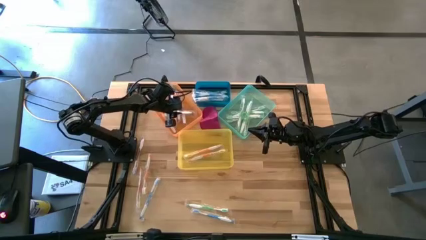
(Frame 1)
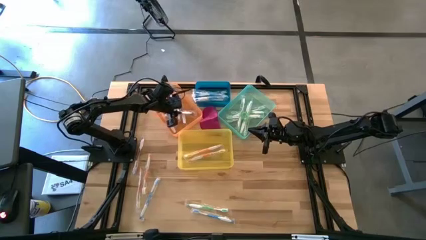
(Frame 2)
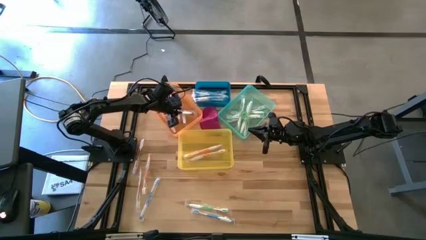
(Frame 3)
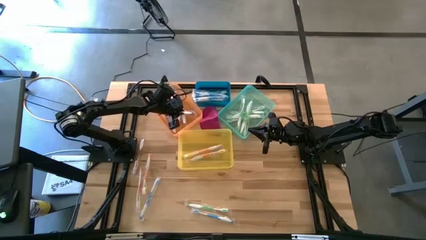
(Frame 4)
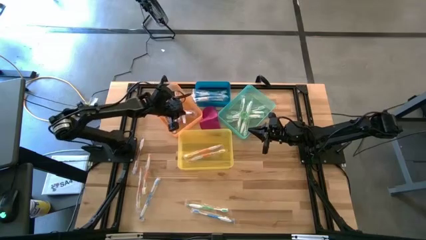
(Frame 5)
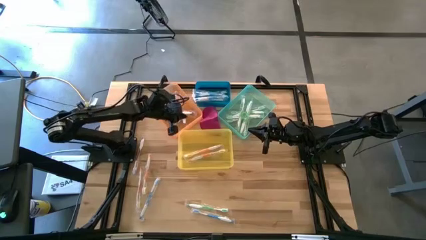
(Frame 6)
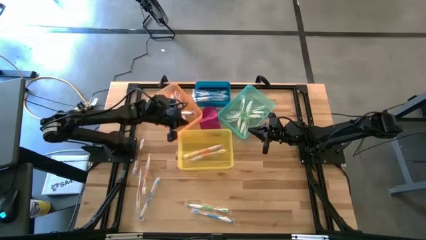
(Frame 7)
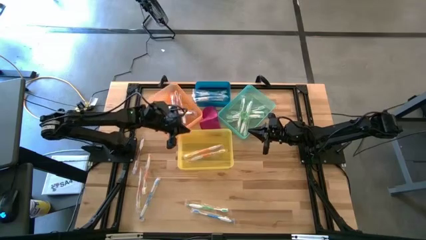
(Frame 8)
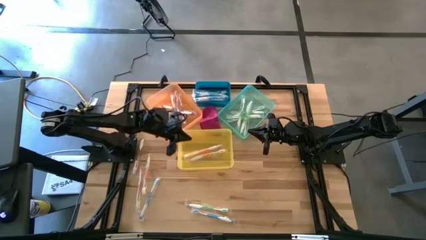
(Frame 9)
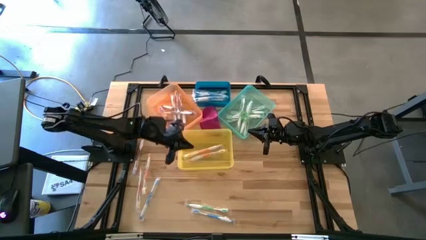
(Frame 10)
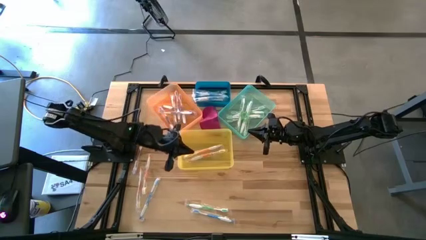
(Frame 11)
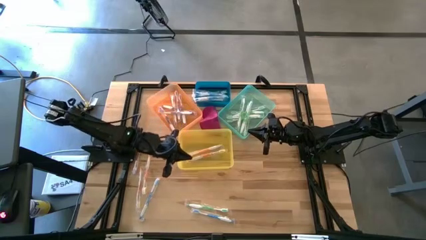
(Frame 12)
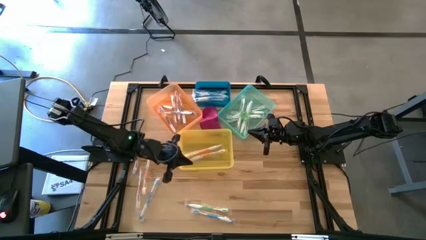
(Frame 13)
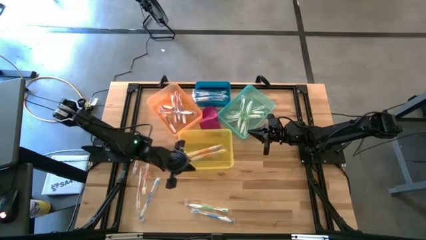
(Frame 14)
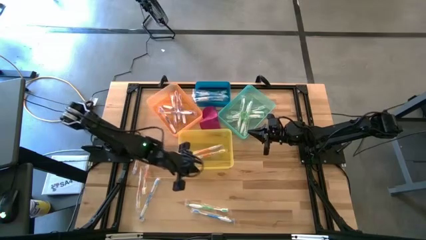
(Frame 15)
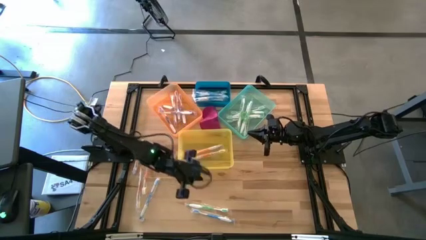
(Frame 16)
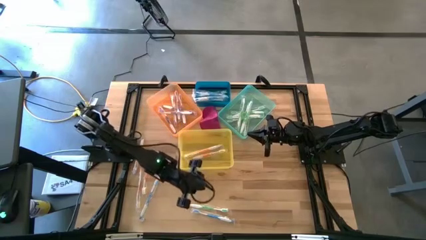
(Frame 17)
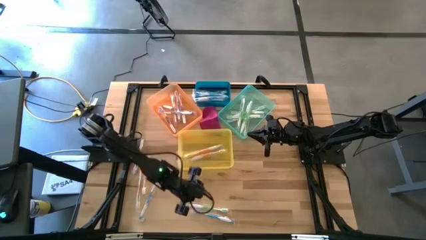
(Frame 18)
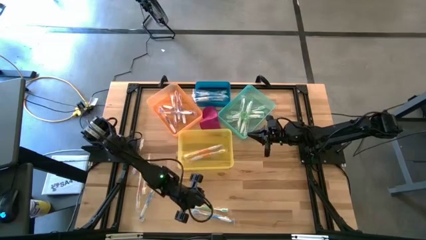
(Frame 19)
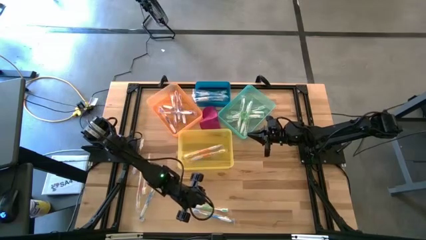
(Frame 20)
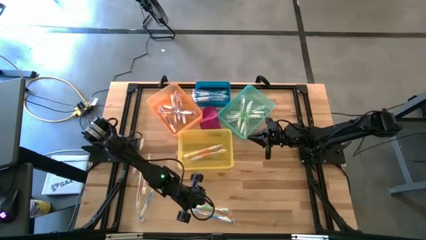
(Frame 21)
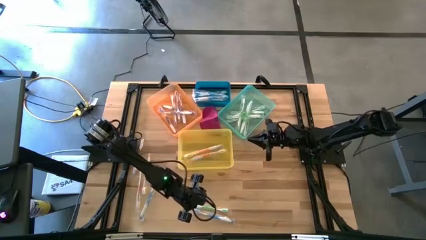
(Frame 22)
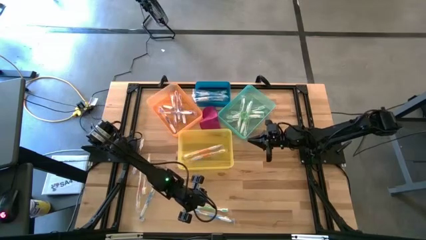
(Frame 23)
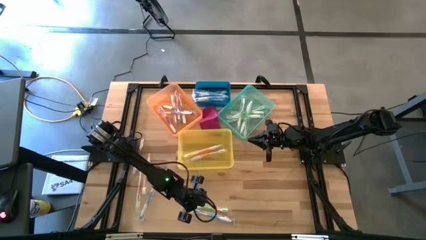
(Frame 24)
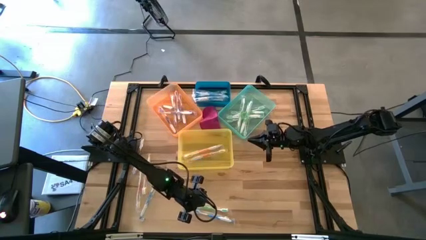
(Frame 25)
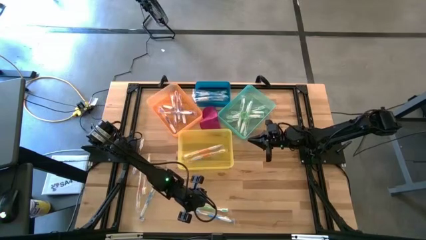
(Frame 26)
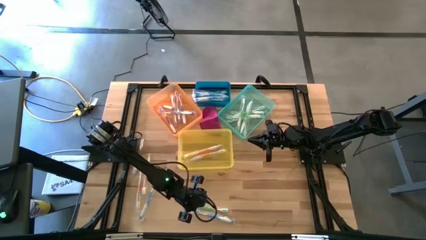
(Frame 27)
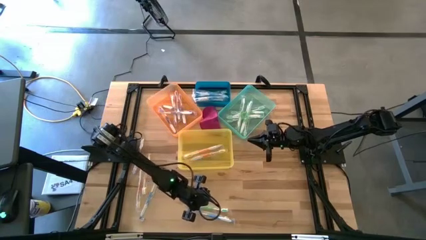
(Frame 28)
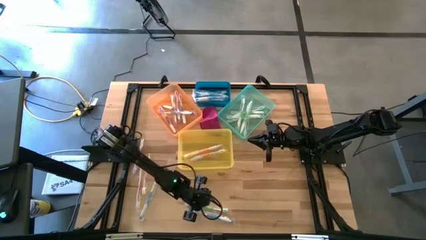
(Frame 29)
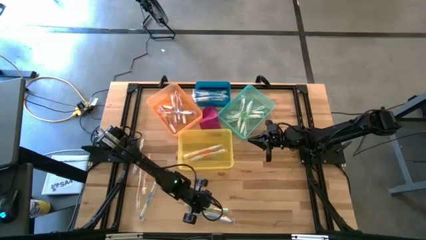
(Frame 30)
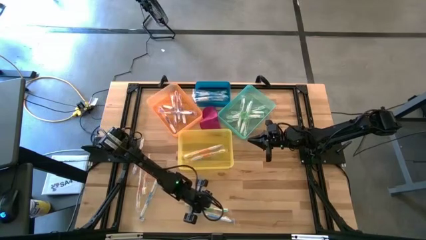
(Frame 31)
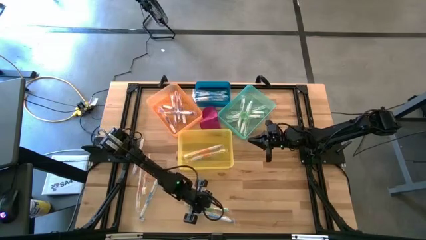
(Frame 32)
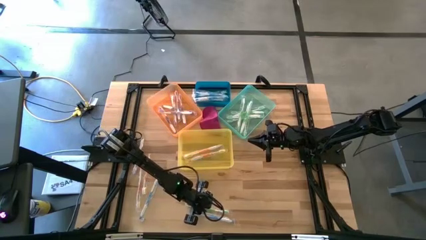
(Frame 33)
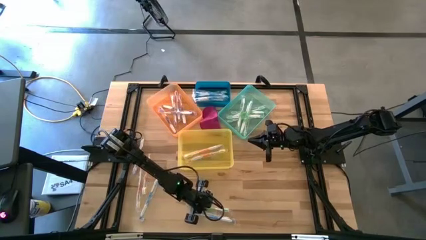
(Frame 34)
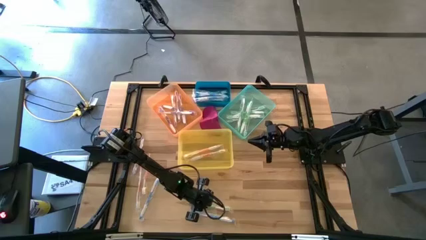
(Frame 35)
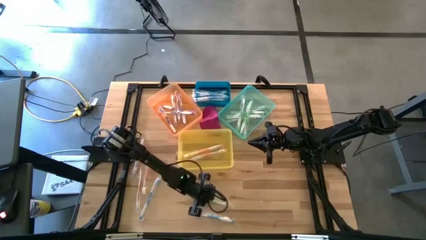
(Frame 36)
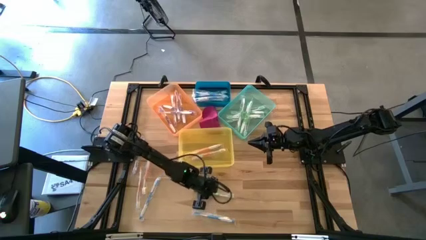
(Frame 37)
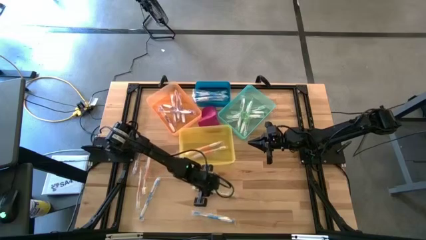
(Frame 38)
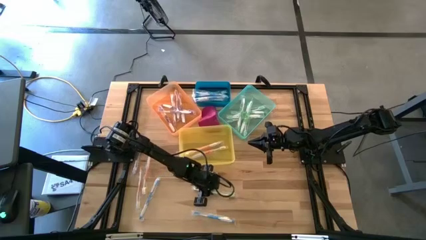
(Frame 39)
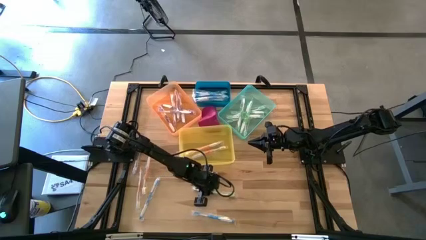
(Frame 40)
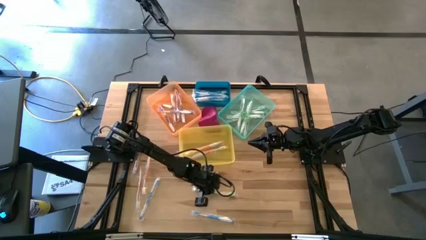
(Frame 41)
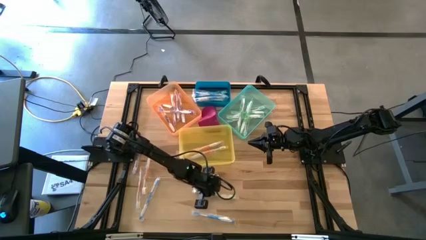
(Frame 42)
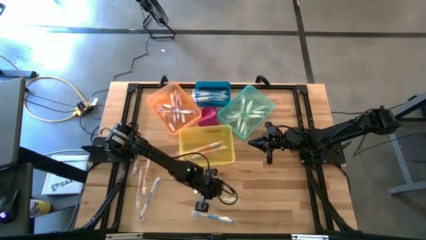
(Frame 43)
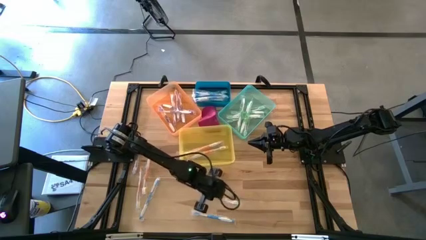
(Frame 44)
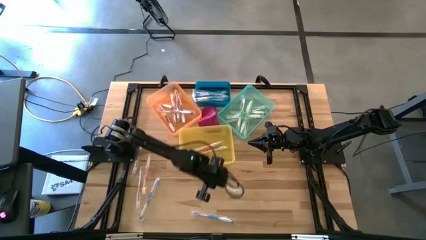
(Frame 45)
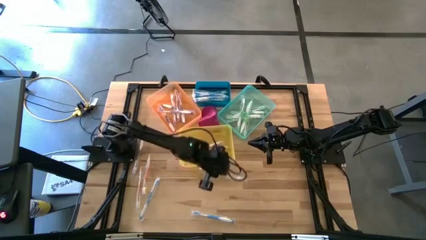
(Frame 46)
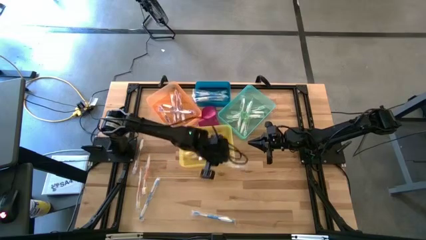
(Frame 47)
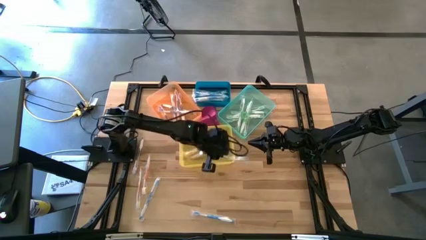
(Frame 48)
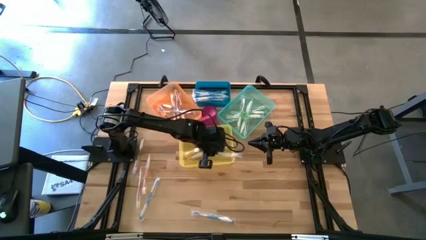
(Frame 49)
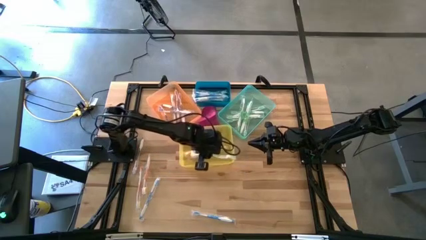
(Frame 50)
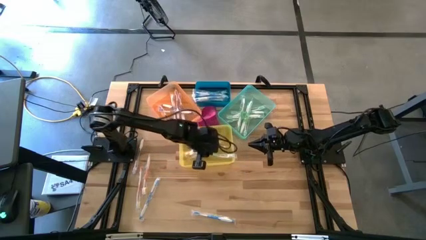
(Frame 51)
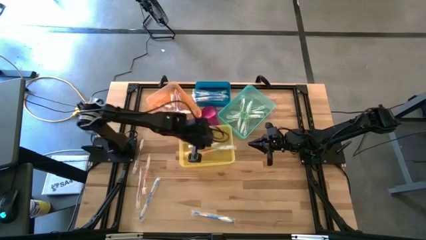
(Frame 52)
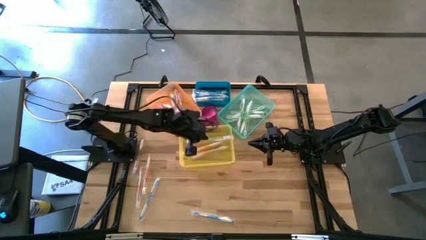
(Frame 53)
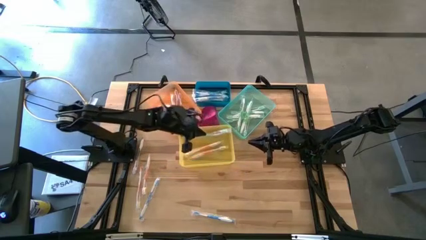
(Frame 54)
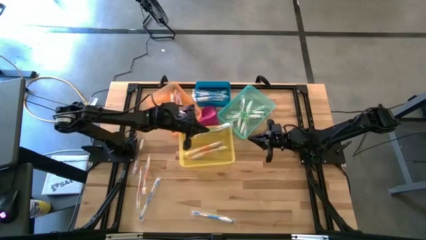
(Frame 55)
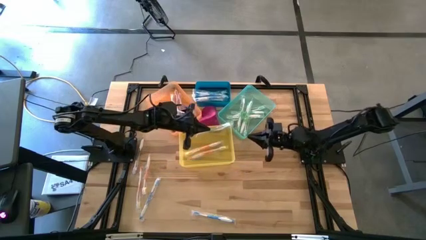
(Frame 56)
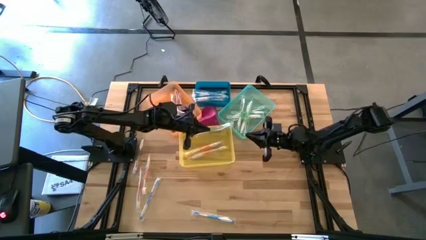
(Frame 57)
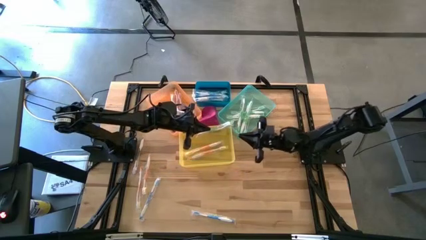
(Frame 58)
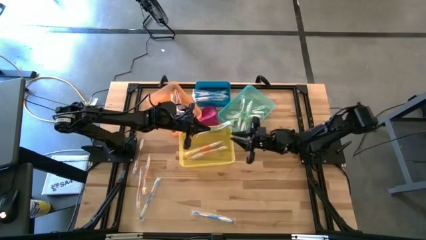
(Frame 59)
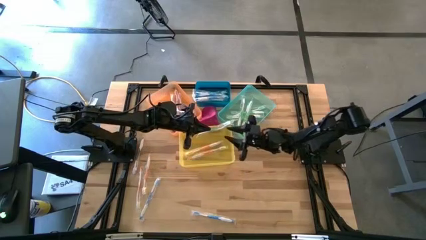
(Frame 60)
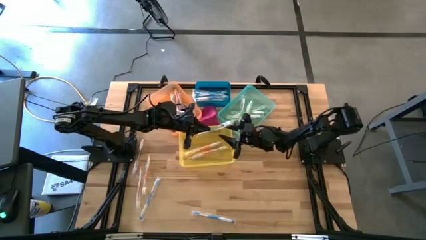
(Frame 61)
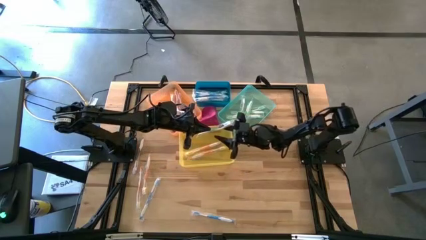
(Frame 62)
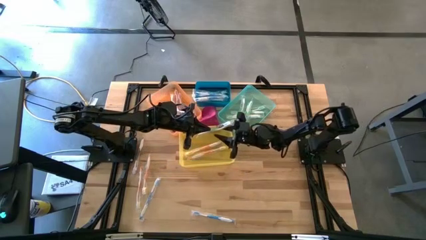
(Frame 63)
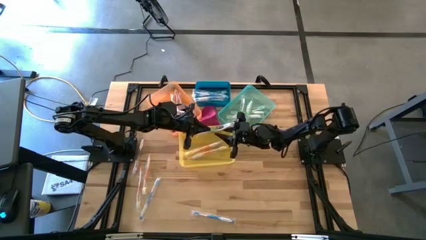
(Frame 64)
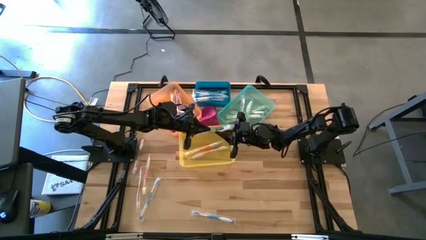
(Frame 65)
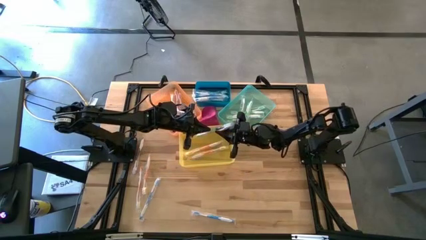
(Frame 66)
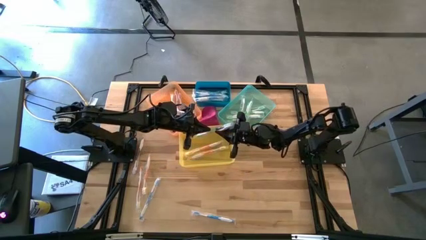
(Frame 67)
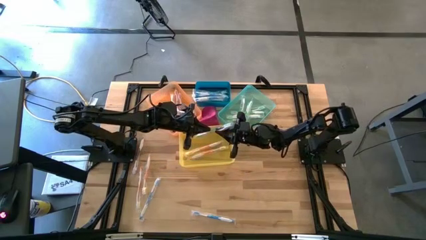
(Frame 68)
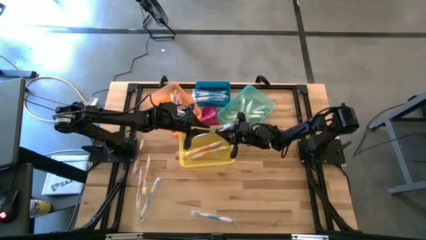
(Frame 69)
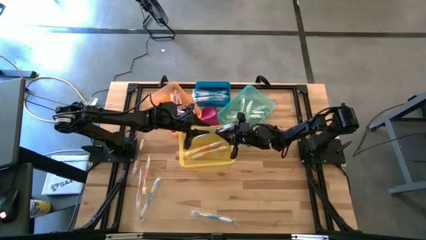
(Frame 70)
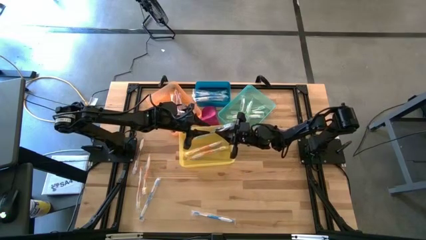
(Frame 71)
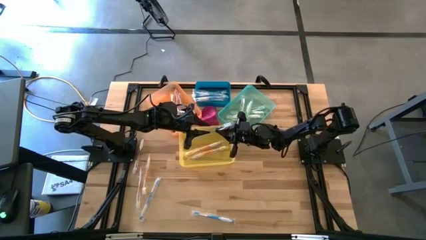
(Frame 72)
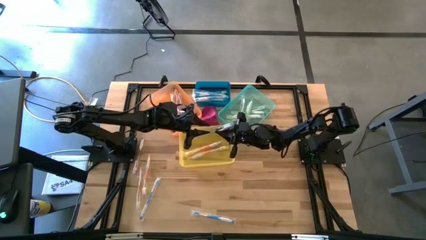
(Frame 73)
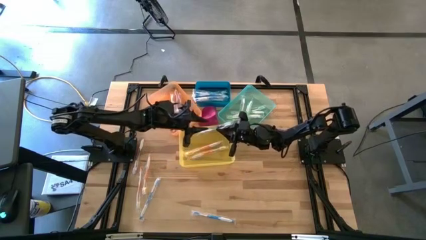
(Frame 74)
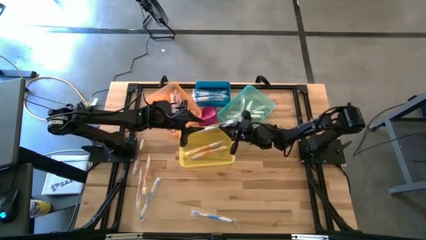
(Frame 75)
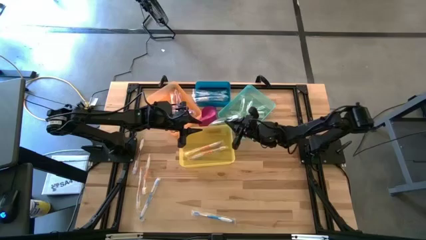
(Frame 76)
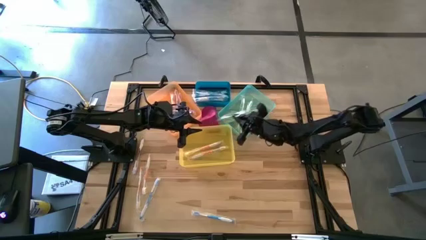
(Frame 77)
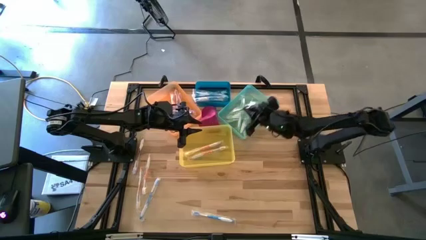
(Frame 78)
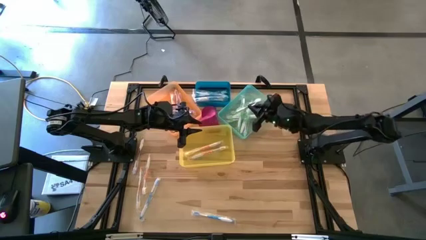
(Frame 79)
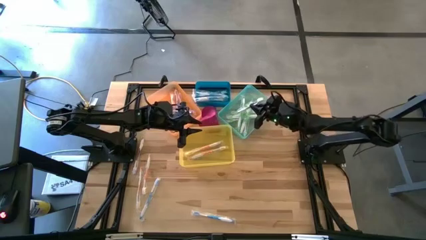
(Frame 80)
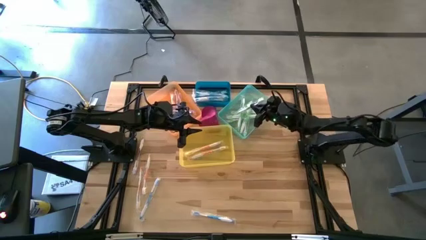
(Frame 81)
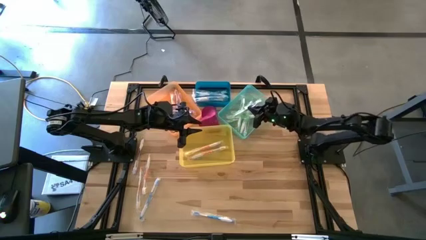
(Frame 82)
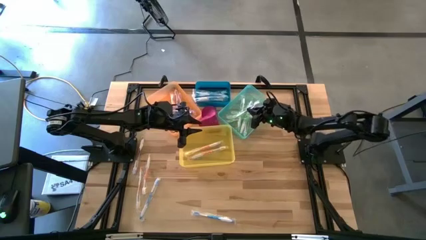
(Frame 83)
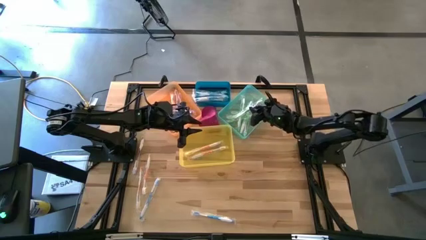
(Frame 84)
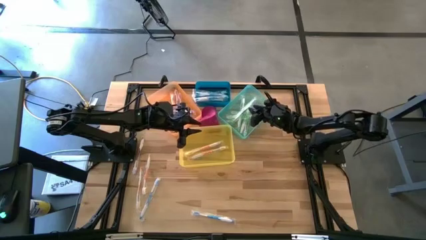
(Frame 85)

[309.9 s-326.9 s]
Task: Pick & Place Toothbrushes
Put the green toothbrush into the green bin
